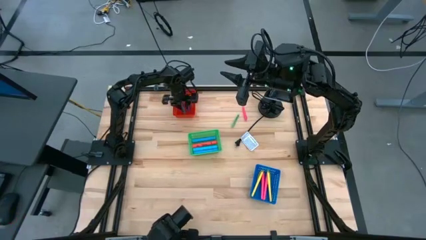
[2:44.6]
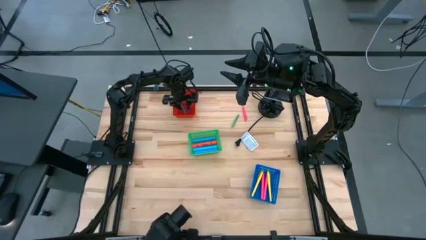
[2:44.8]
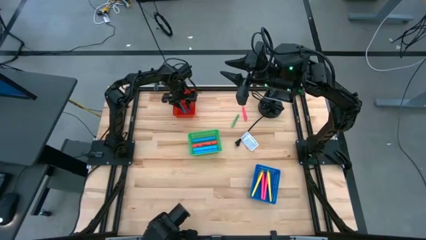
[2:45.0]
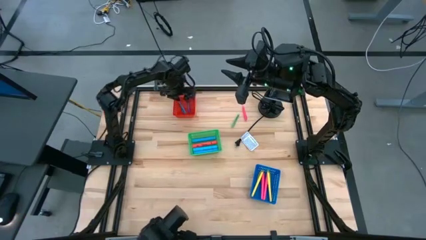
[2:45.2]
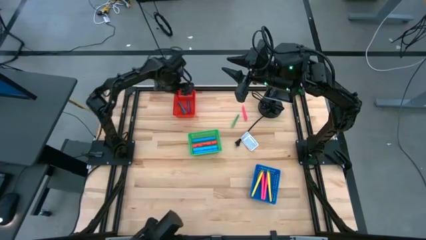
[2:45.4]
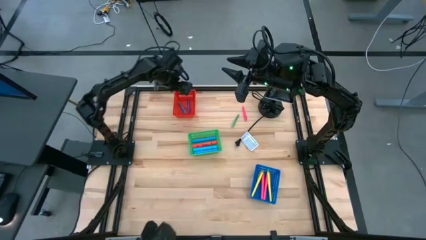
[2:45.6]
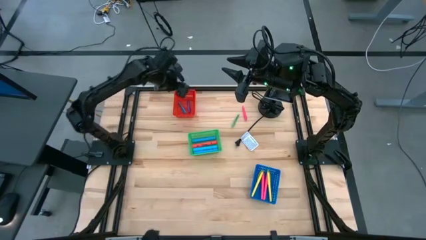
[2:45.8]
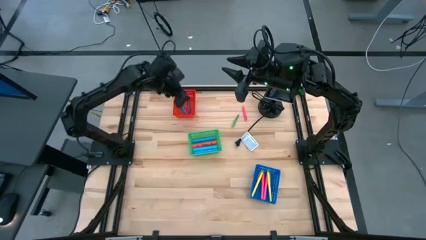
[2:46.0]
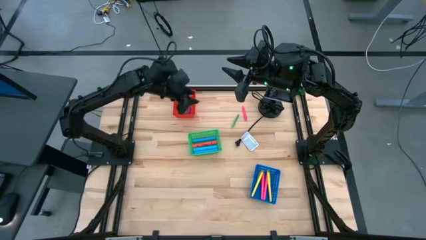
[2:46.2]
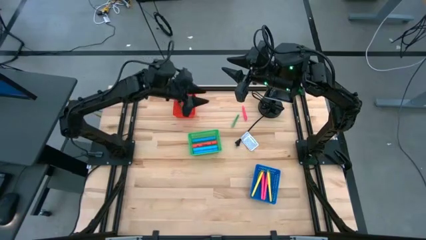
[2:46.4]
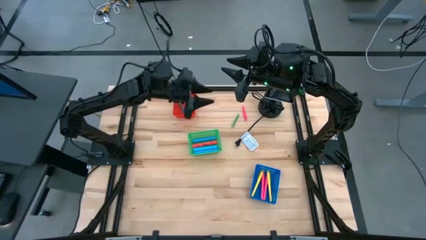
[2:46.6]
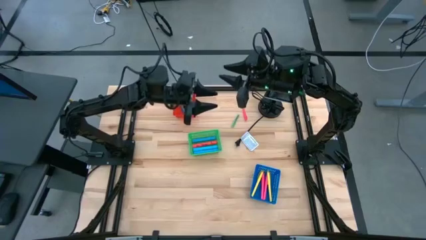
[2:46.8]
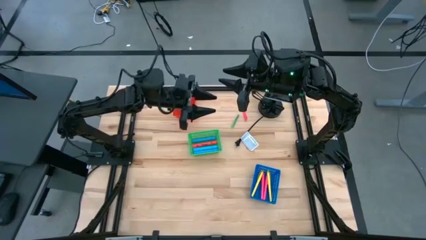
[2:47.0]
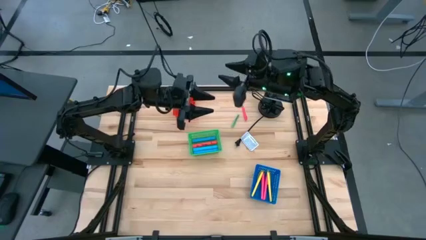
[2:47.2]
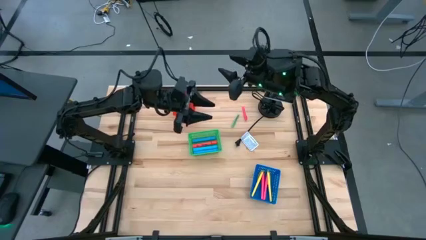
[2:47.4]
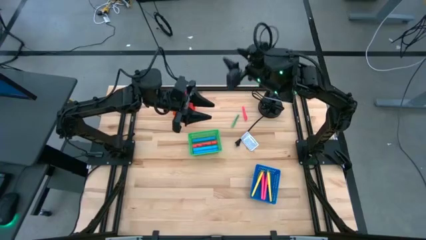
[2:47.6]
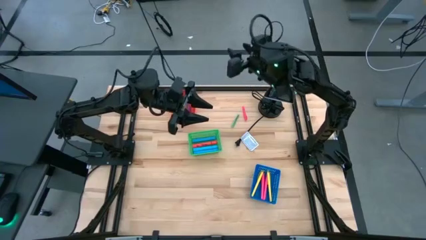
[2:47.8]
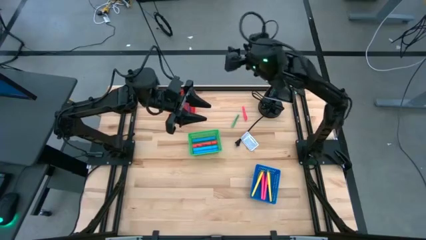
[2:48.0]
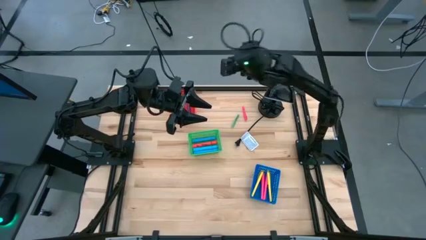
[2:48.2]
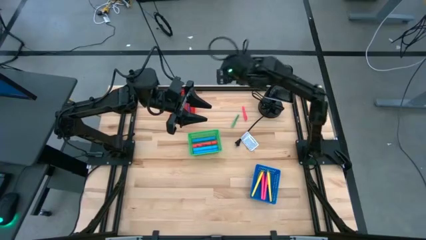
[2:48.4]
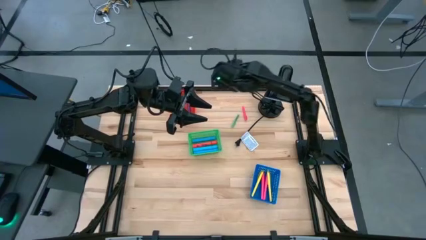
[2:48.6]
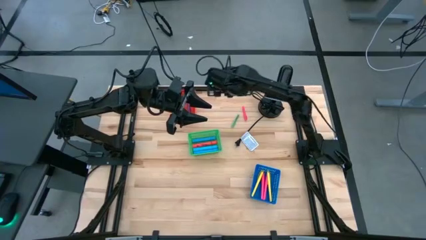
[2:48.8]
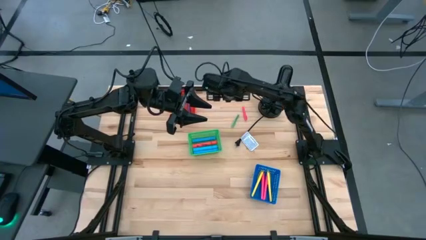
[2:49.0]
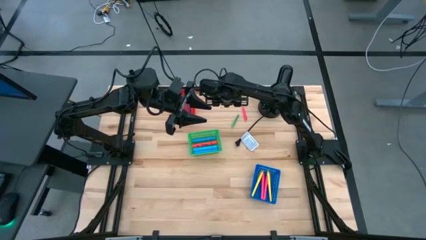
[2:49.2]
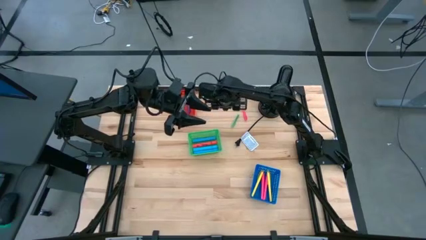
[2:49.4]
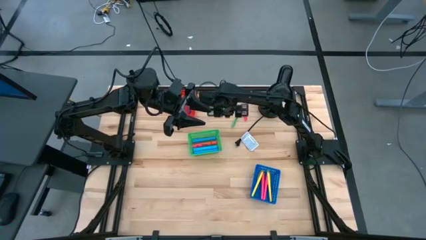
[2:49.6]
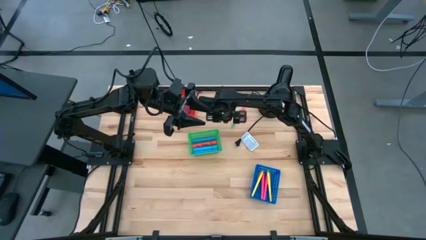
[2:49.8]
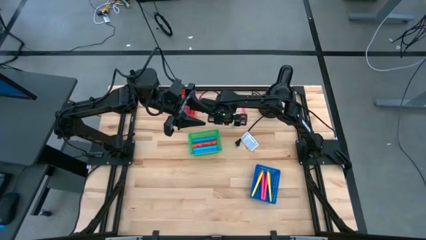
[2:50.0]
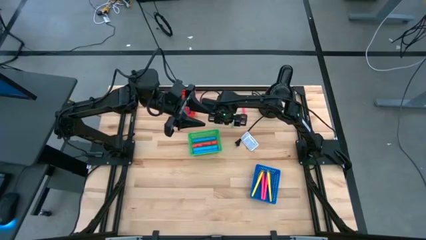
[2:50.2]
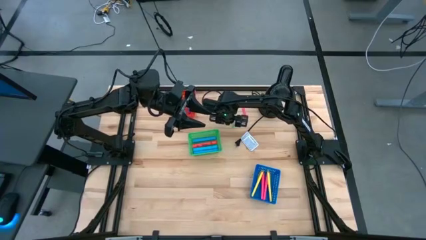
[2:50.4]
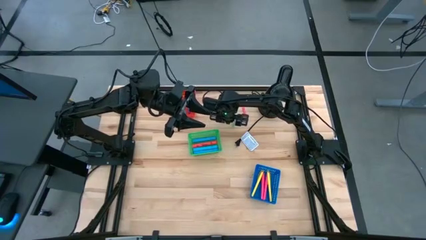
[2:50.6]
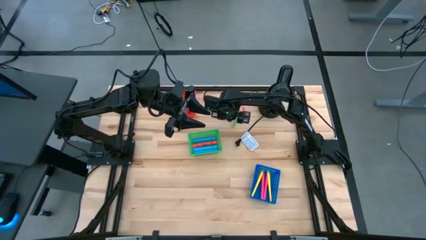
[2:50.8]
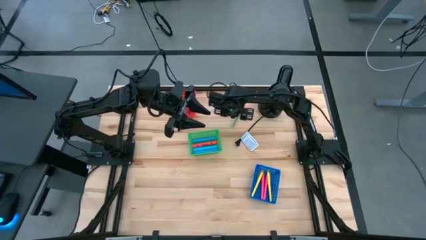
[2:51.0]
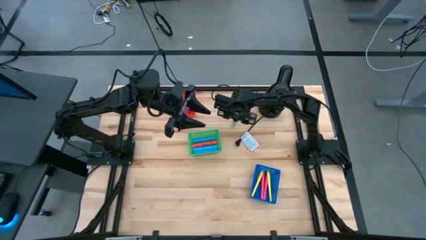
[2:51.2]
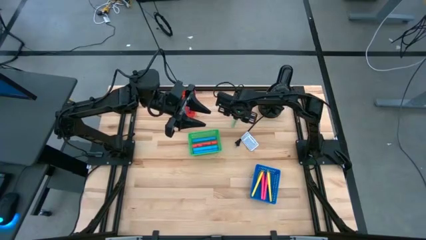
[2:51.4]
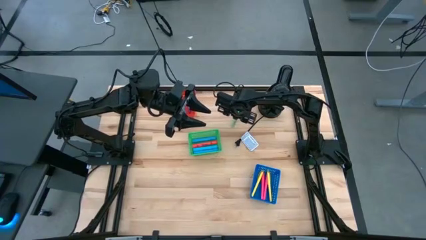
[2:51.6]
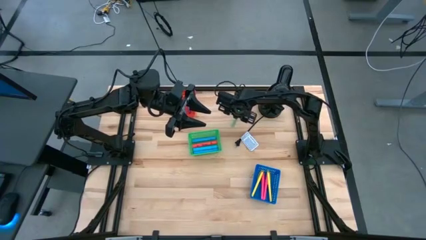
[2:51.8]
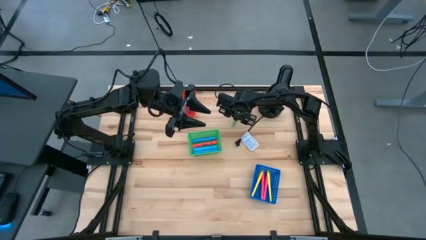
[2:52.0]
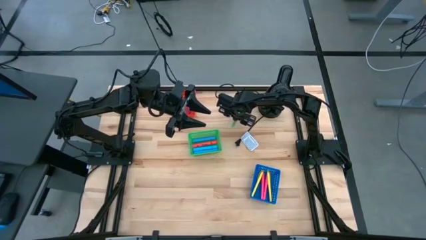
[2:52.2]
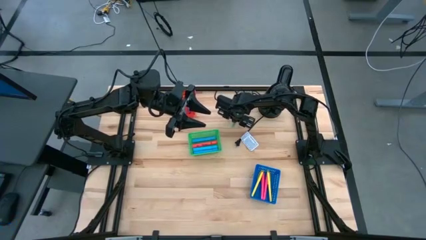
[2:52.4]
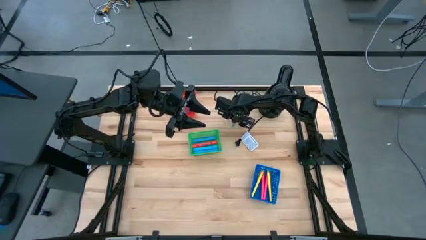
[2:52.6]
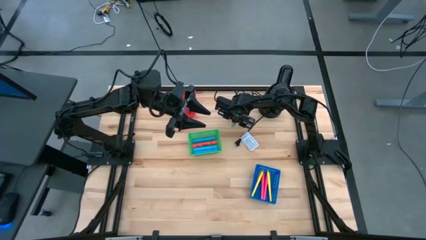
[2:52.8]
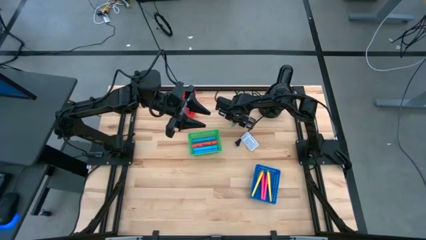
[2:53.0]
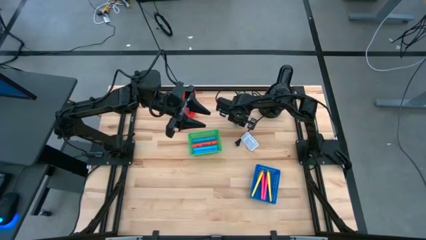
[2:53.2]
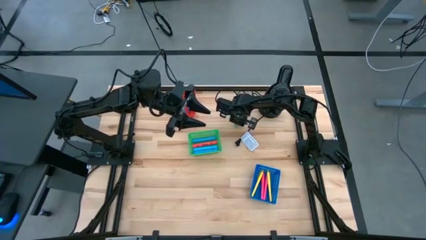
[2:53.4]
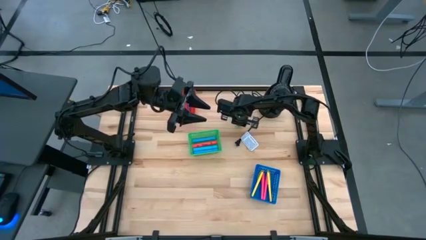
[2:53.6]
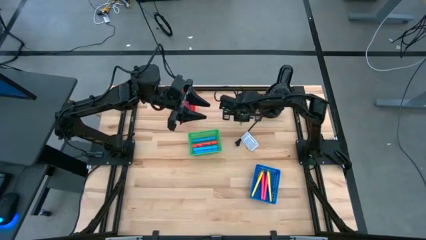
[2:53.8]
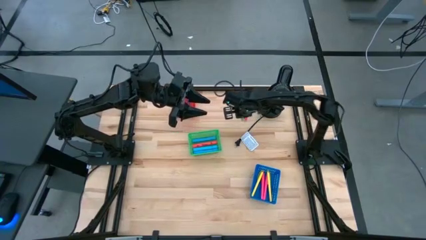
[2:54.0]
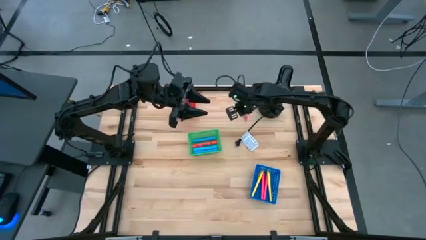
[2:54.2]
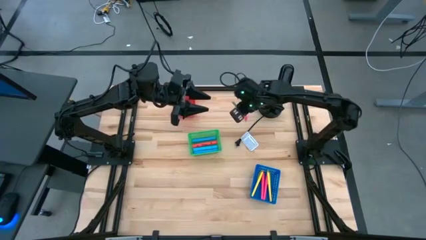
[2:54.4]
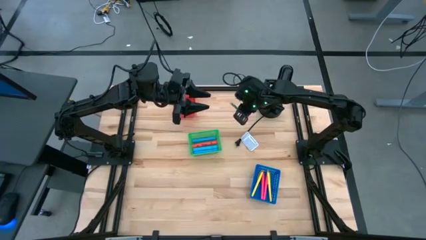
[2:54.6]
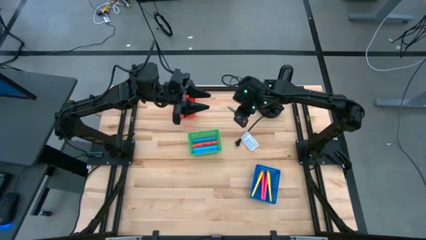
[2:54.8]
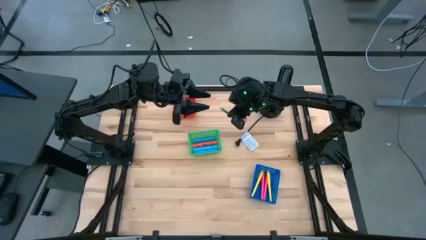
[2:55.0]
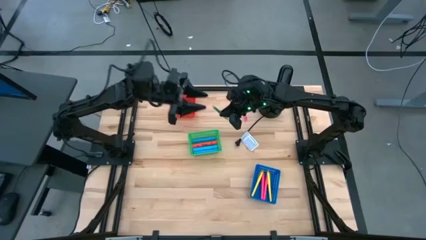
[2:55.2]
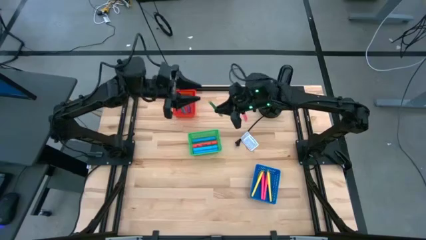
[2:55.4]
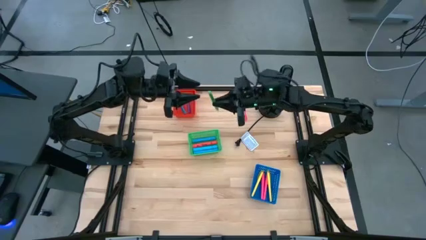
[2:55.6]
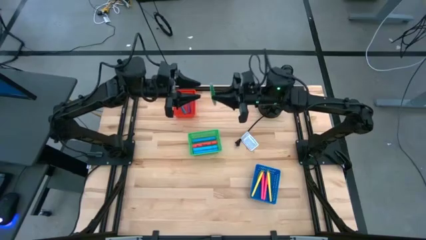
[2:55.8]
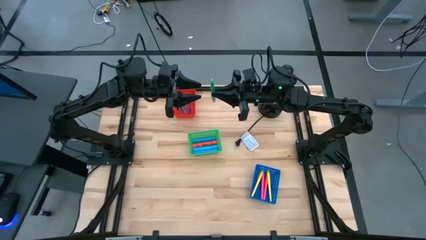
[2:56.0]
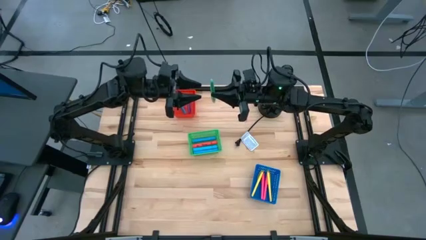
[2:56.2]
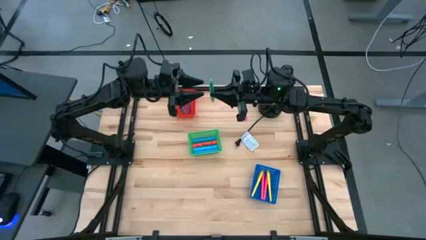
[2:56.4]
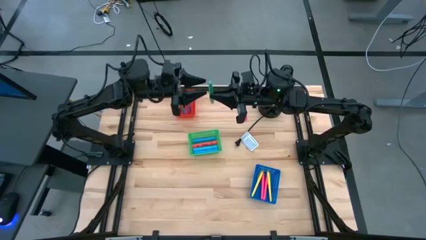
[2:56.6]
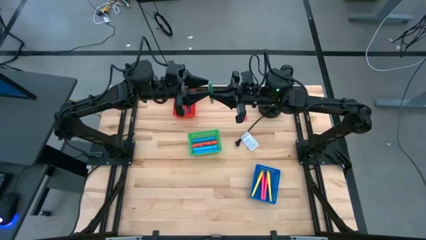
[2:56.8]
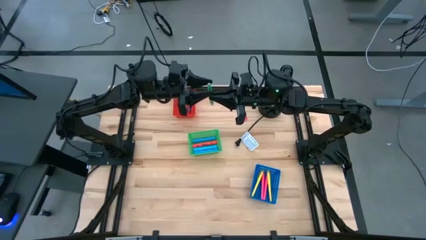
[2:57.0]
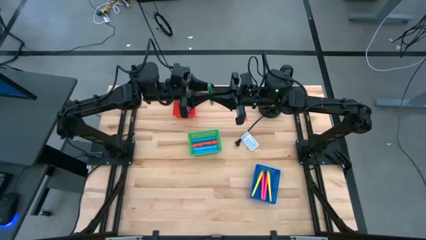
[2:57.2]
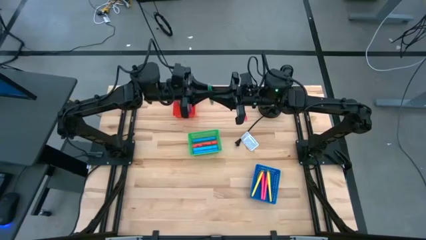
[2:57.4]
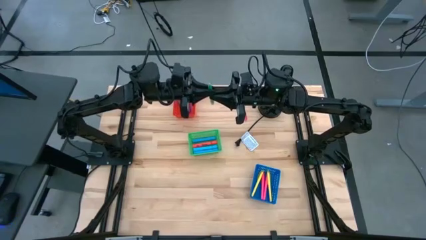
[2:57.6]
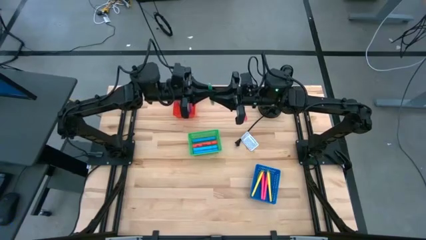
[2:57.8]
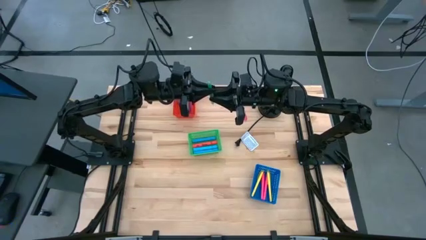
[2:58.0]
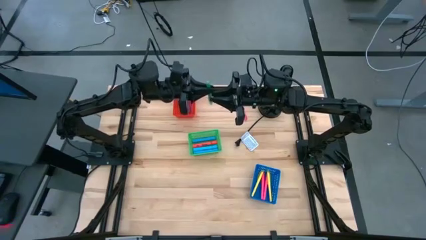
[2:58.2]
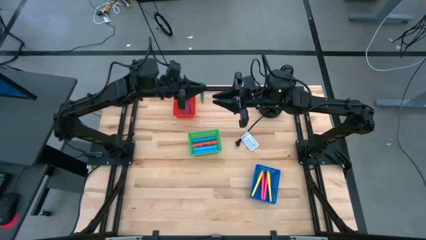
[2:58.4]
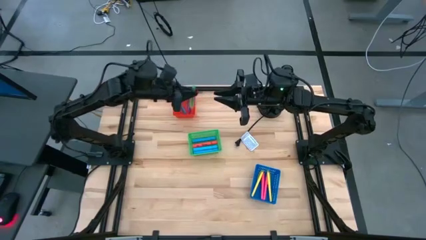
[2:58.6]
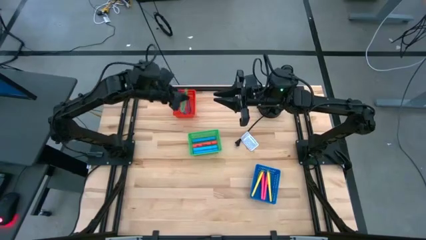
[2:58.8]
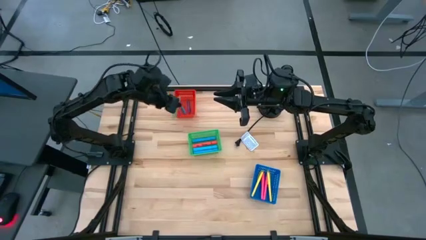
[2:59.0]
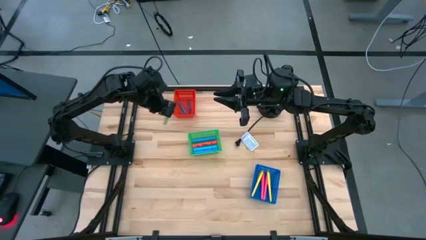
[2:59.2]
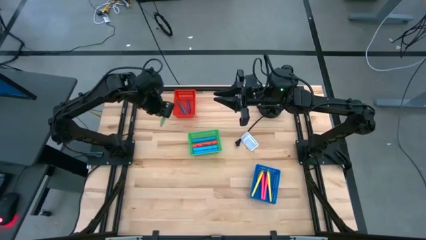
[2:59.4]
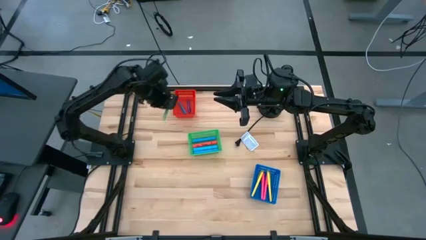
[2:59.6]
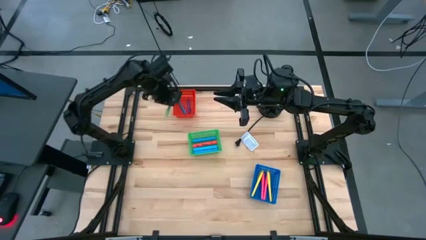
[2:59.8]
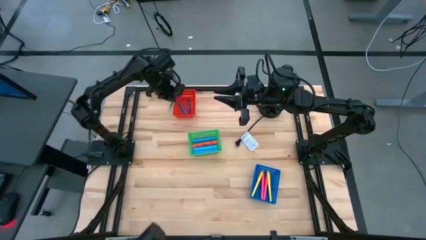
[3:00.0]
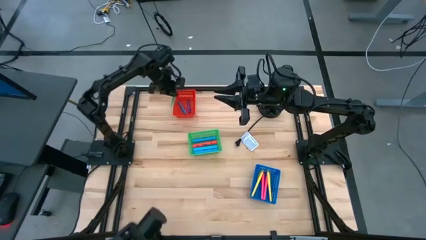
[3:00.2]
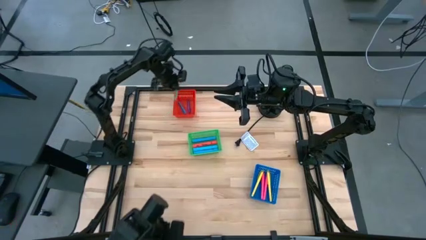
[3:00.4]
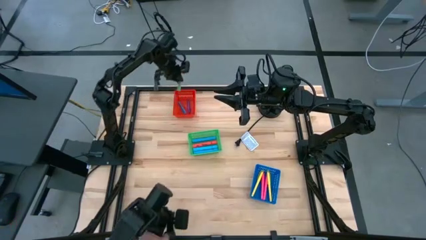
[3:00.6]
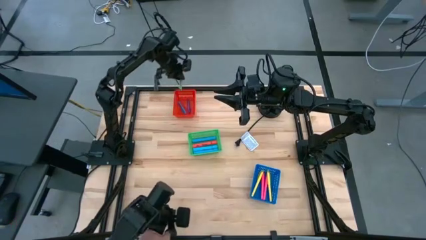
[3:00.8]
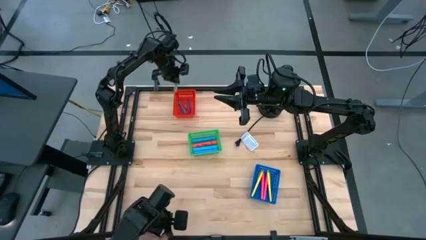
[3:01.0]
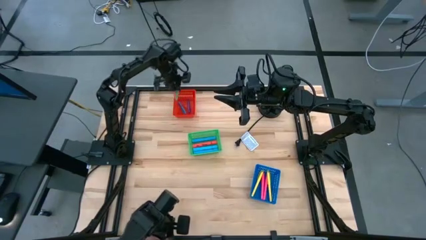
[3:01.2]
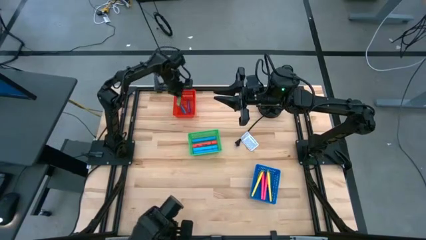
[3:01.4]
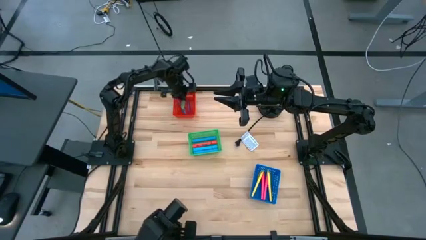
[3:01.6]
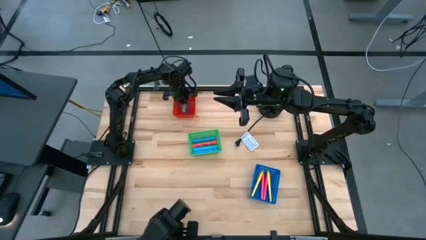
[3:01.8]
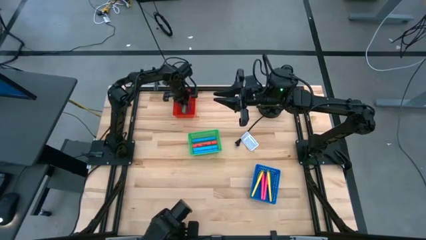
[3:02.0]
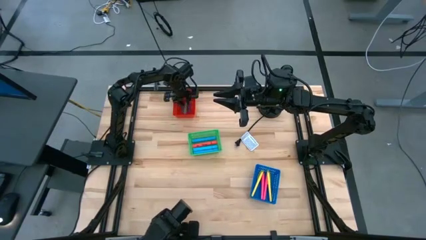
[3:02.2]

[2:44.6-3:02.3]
Task: Pick & Place Markers
Put the small green pen into the red bin
